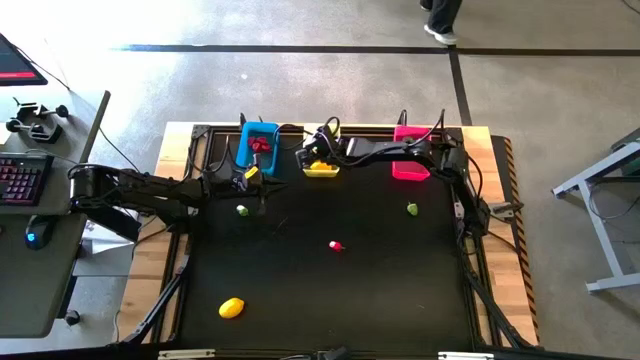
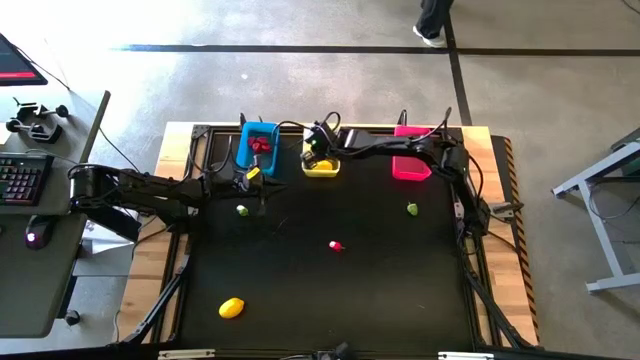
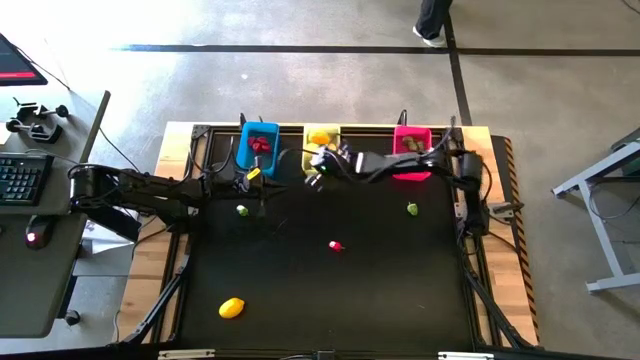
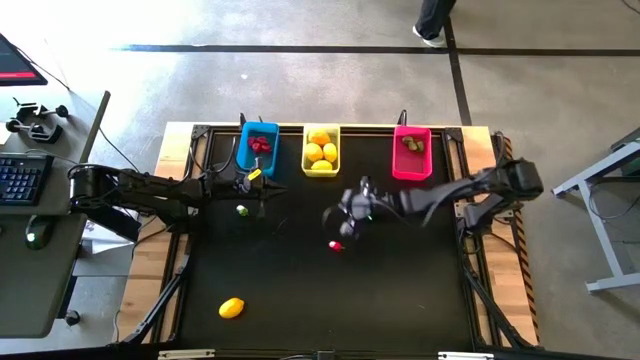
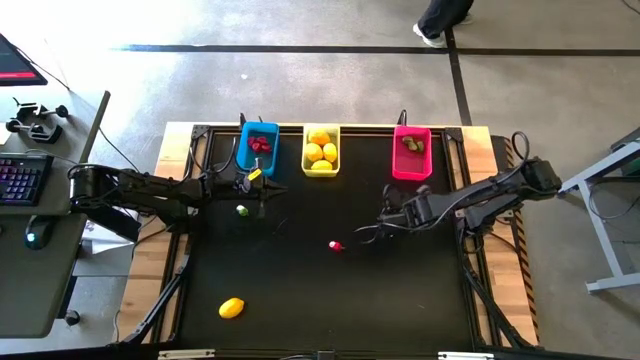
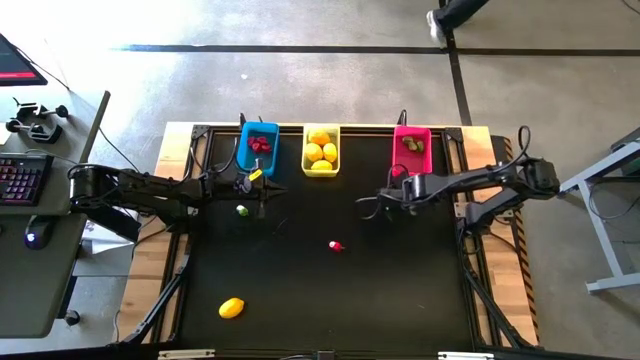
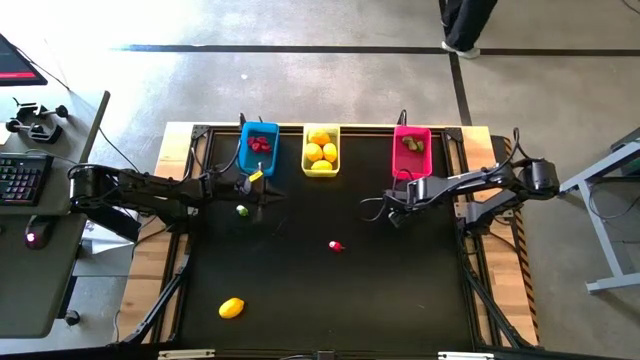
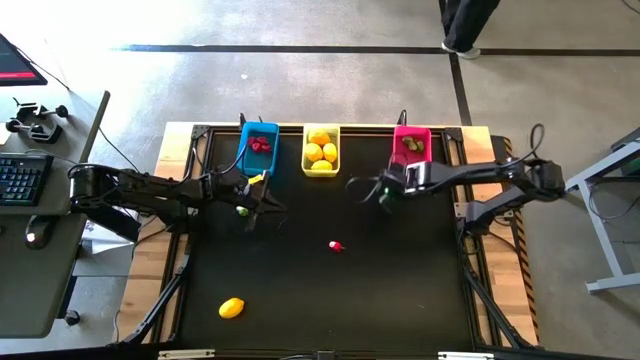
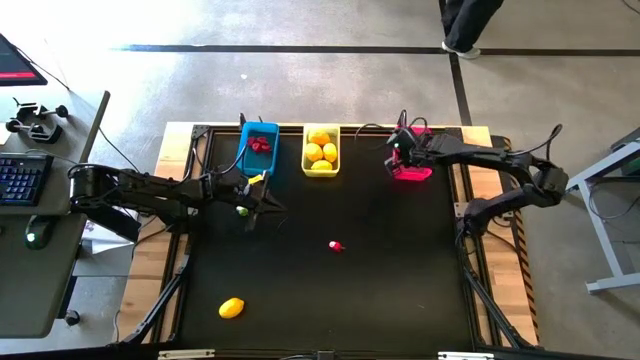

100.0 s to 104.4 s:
Task: Sort produce into baskets
Put the green bell pepper into the pink bin

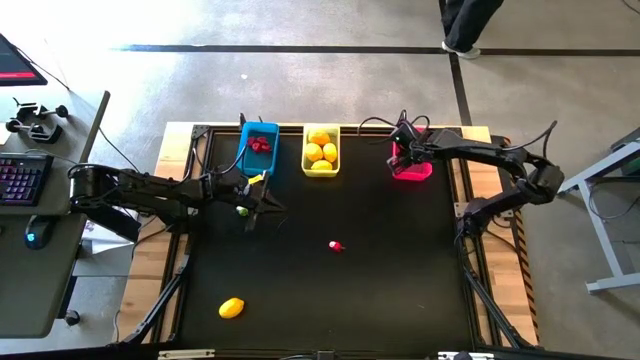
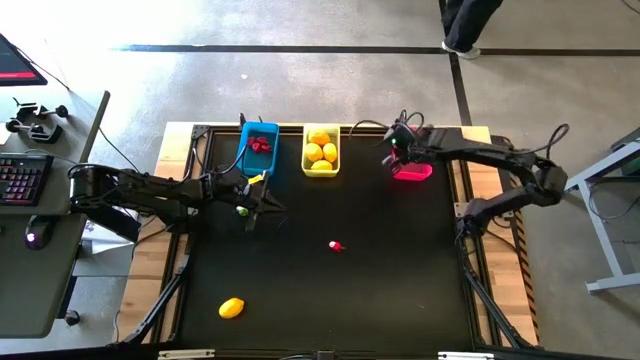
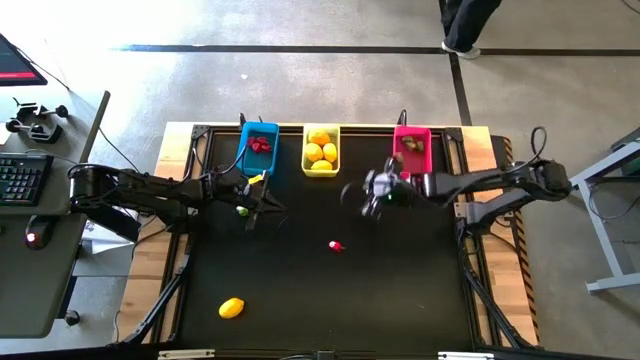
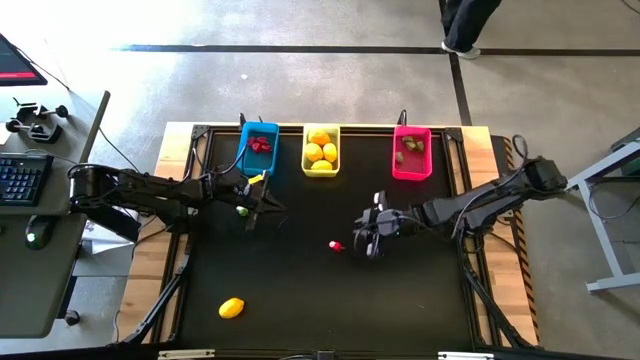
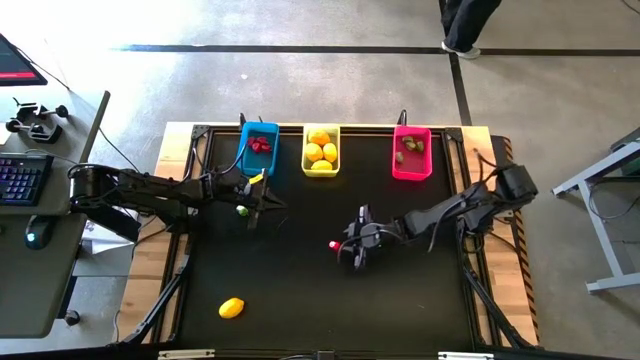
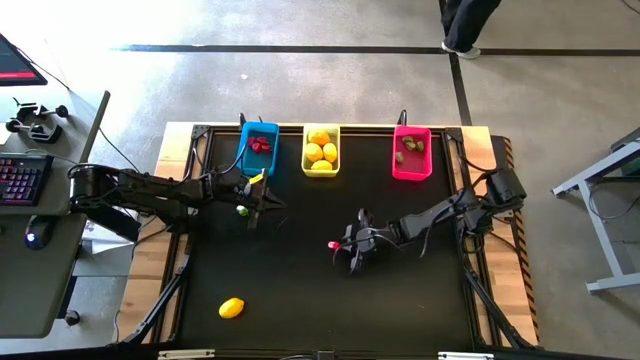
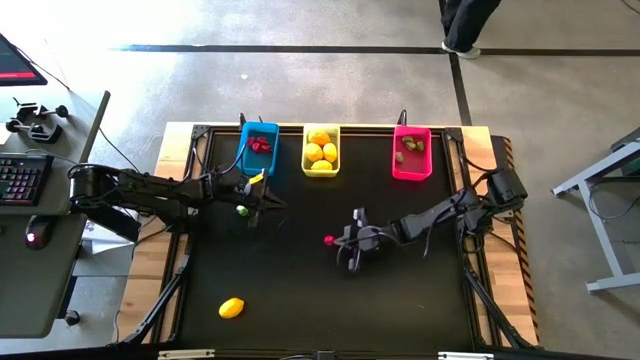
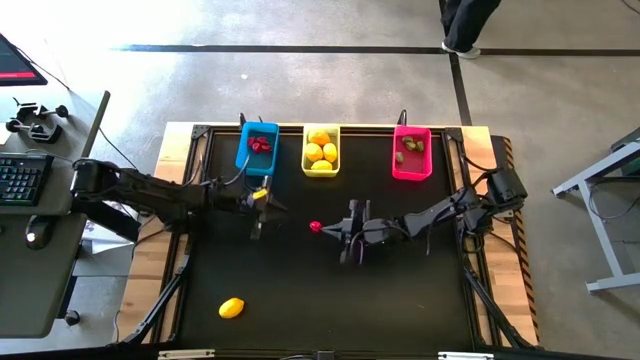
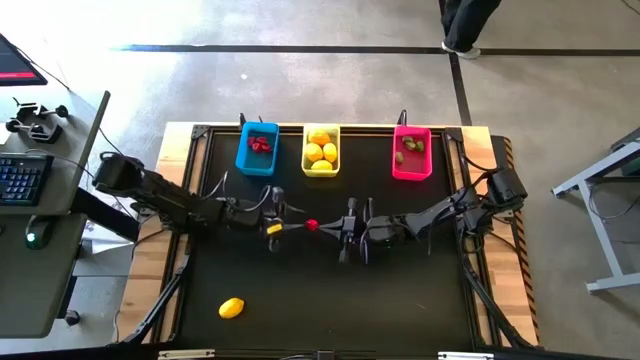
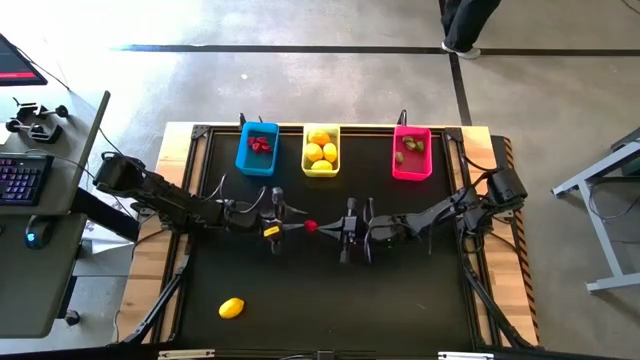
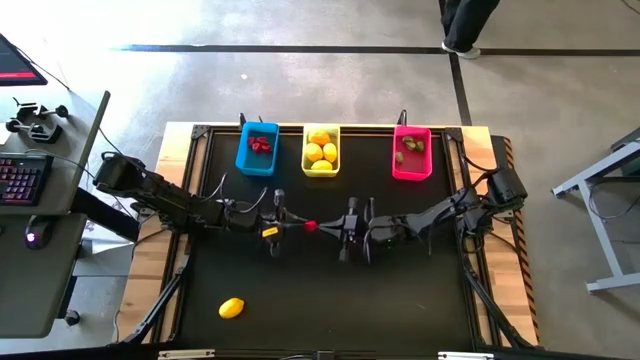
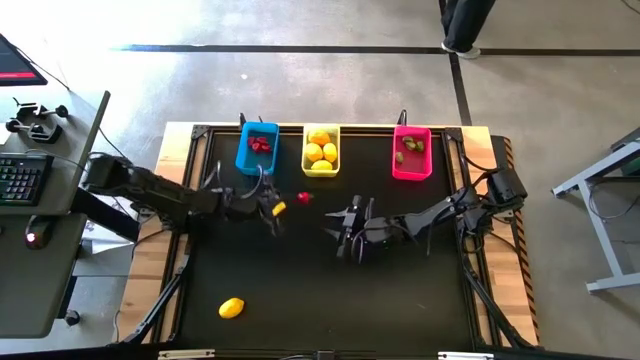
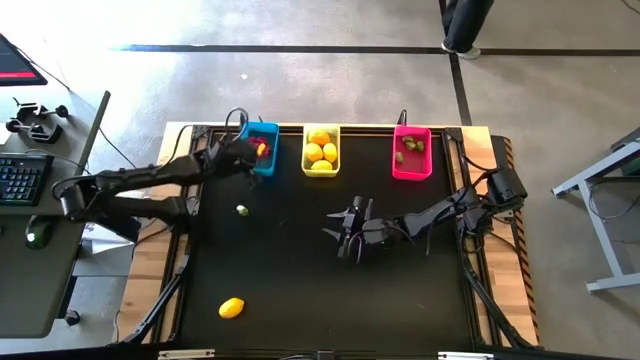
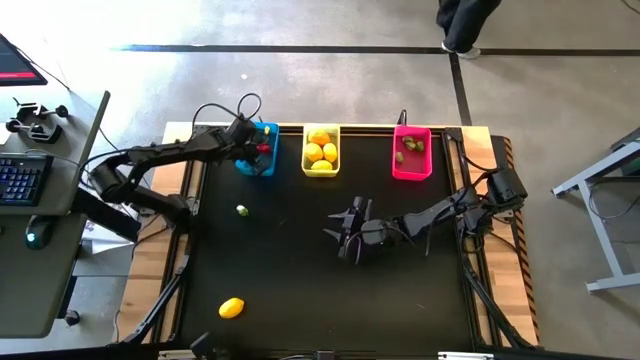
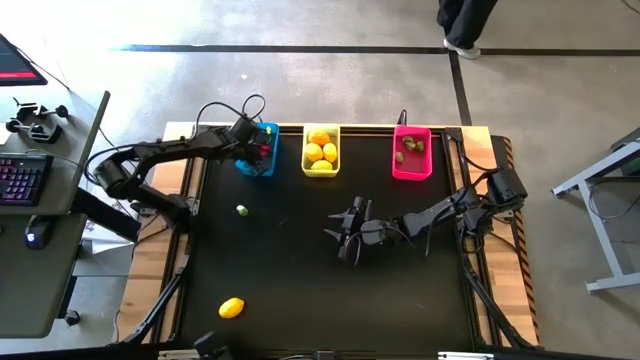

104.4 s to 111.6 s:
Put the red bell pepper into the blue bin

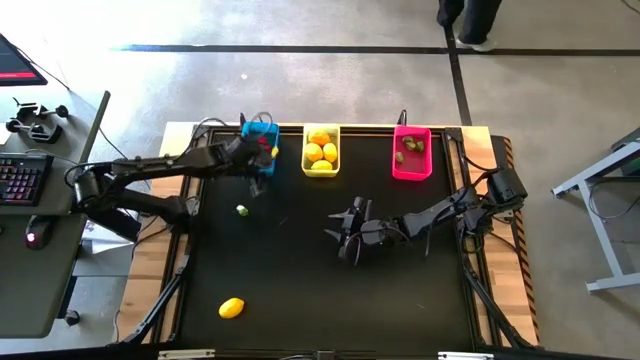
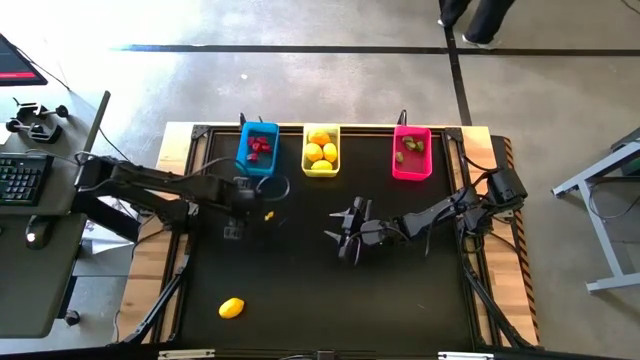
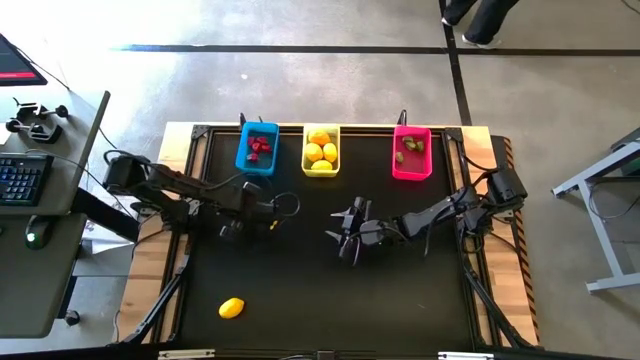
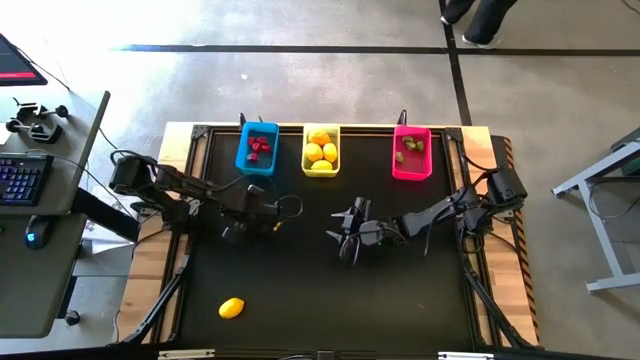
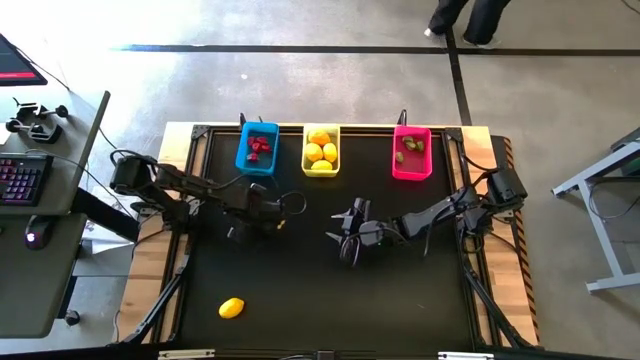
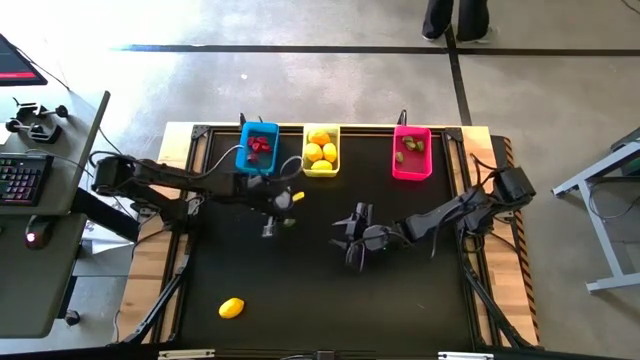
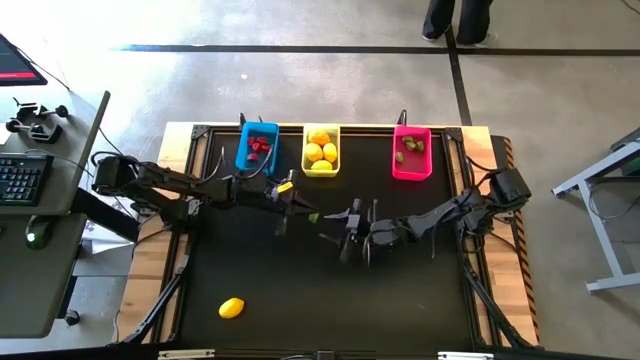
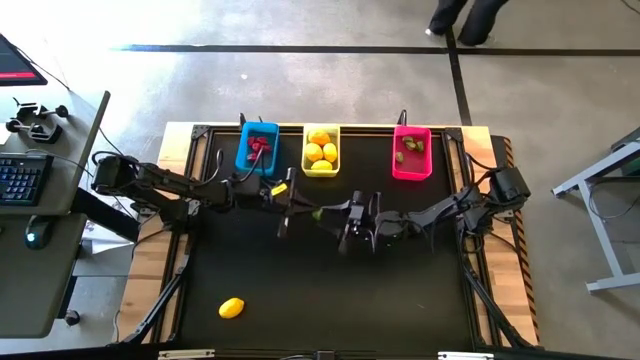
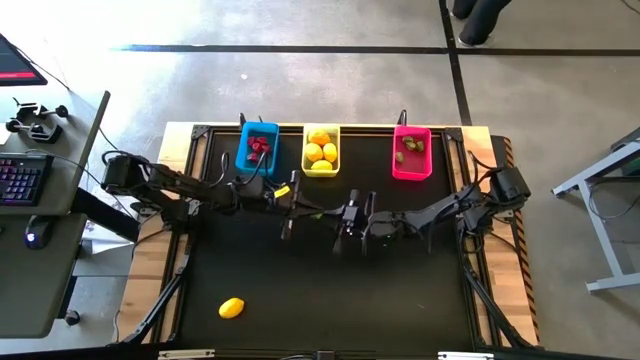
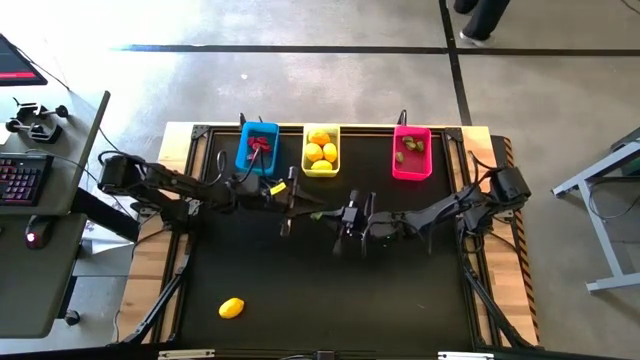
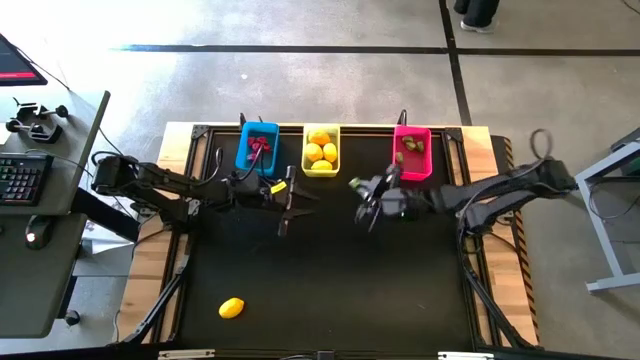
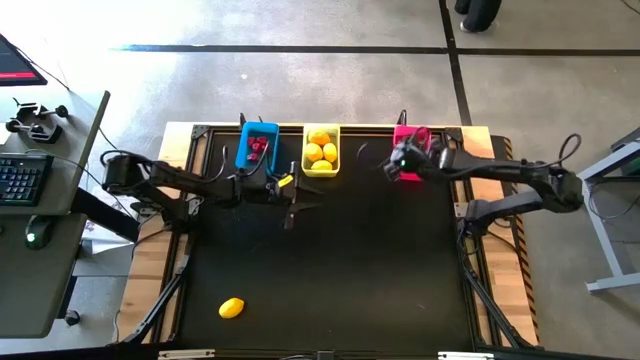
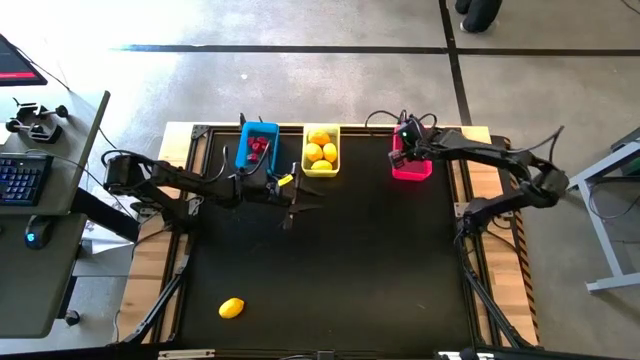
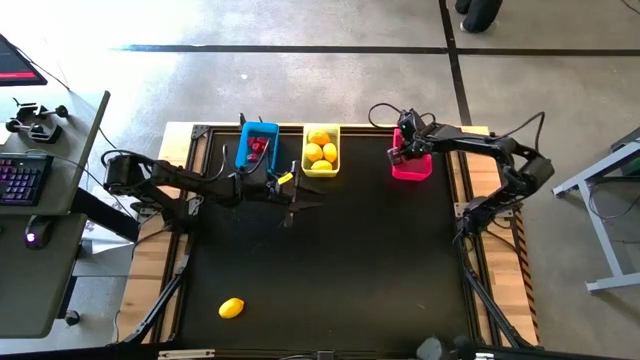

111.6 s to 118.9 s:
Put the green bell pepper into the pink bin

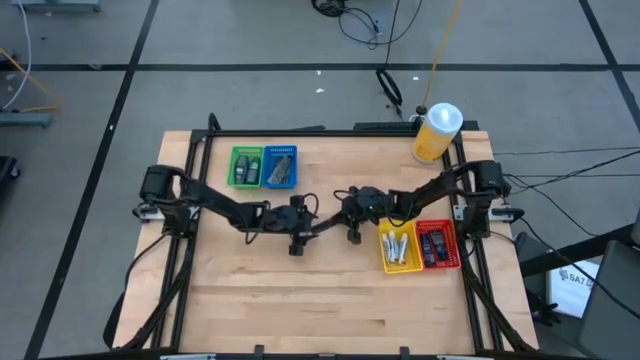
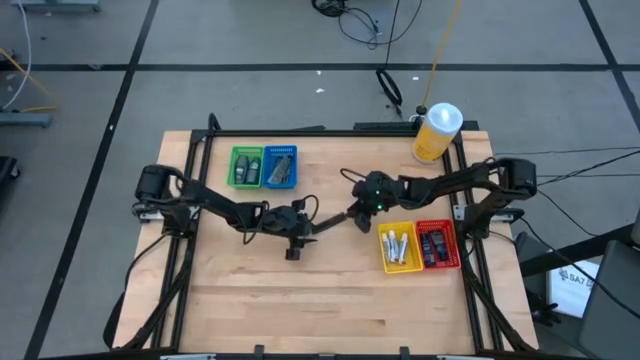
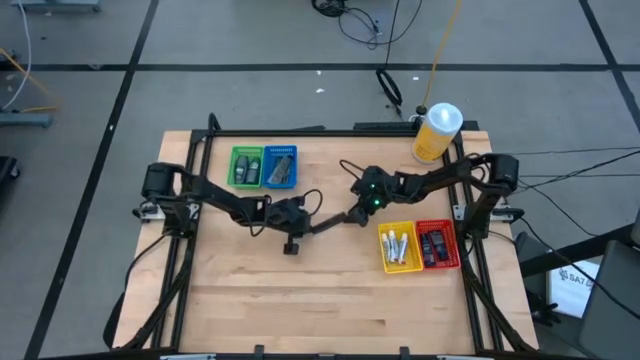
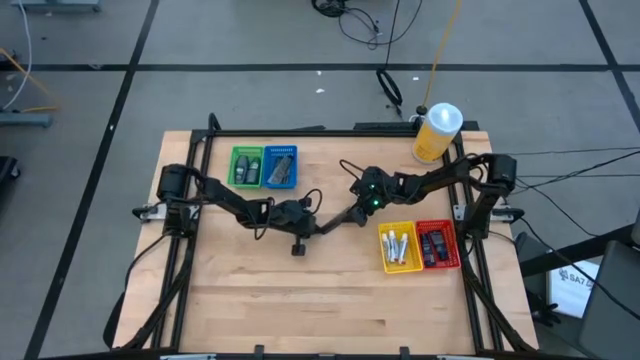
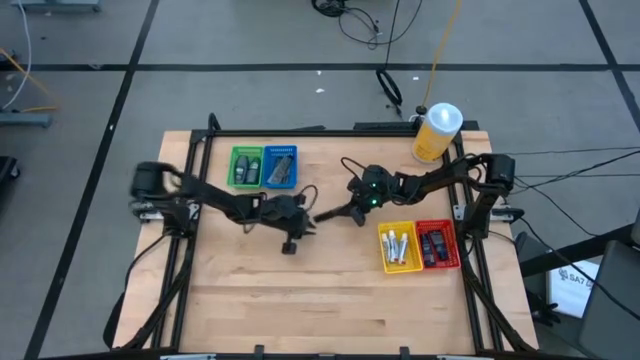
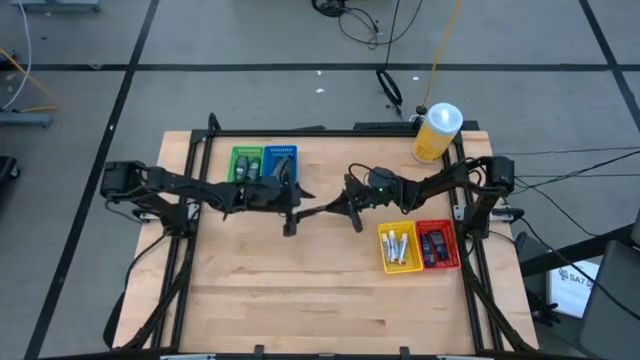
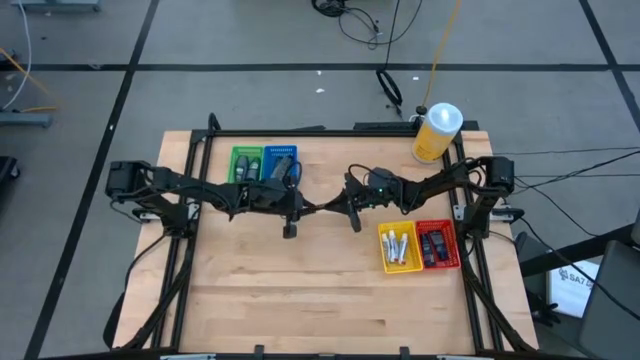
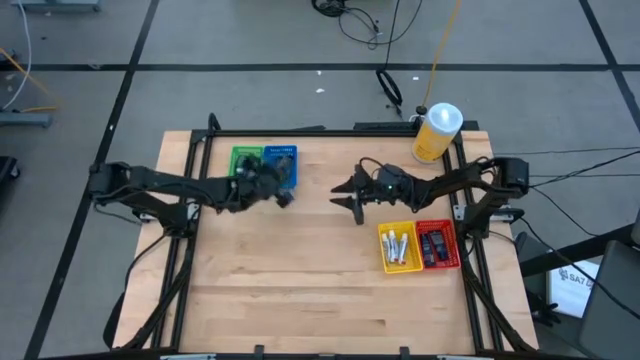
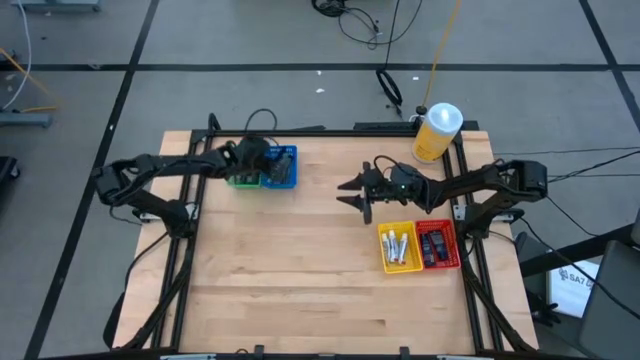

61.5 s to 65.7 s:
Task: Pick & Place Travel size toiletries
Put the black comb into the blue bin
